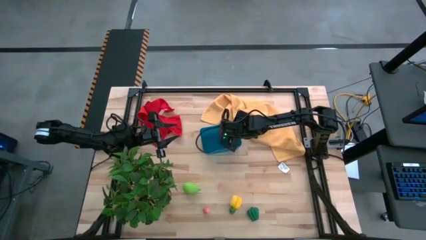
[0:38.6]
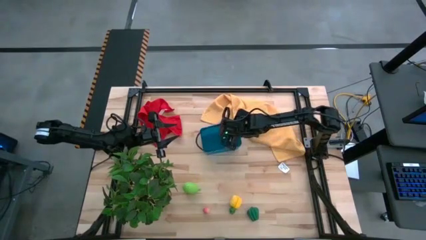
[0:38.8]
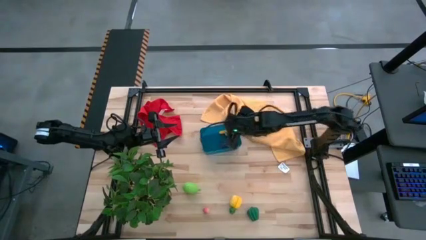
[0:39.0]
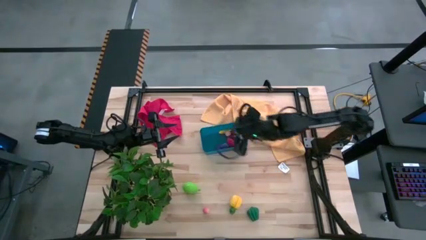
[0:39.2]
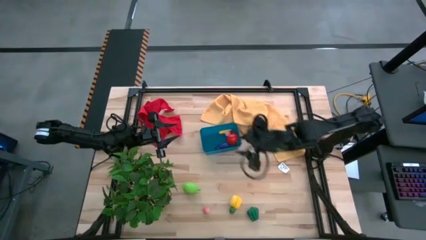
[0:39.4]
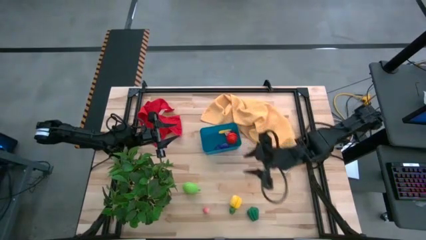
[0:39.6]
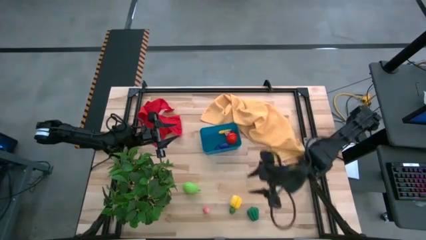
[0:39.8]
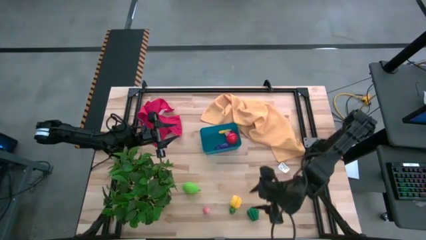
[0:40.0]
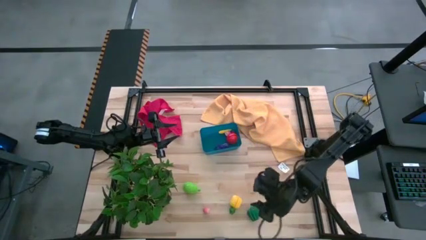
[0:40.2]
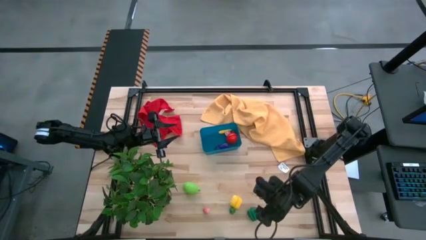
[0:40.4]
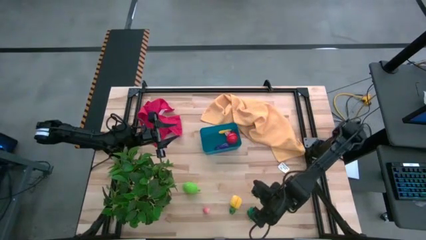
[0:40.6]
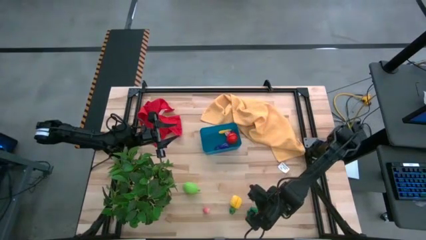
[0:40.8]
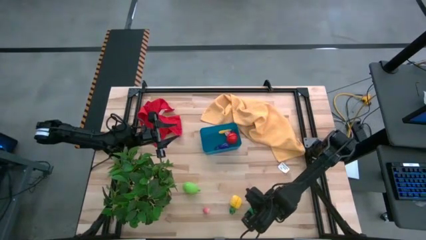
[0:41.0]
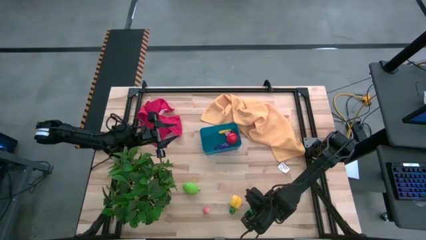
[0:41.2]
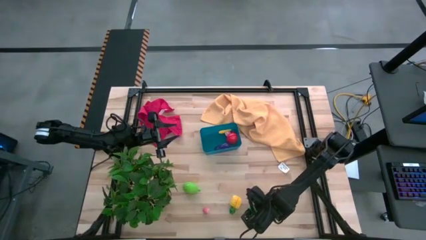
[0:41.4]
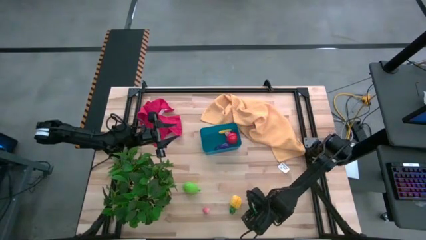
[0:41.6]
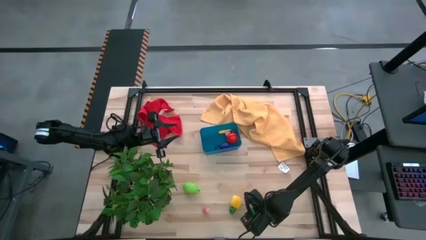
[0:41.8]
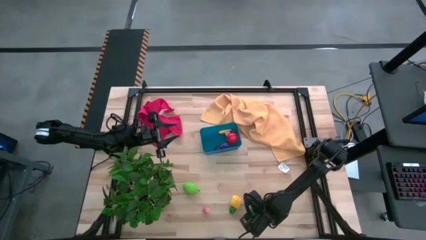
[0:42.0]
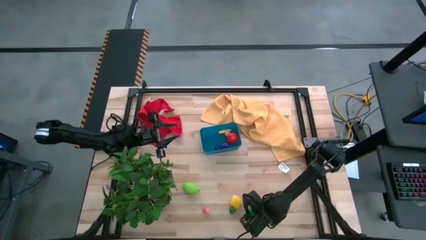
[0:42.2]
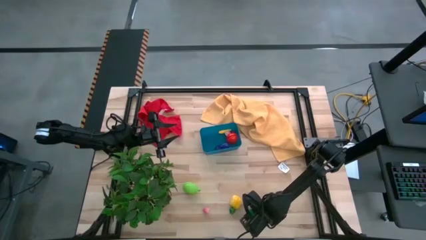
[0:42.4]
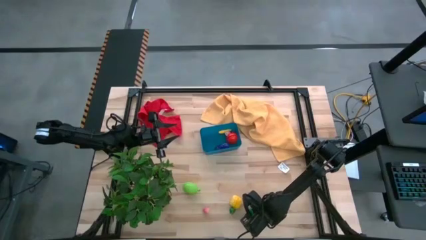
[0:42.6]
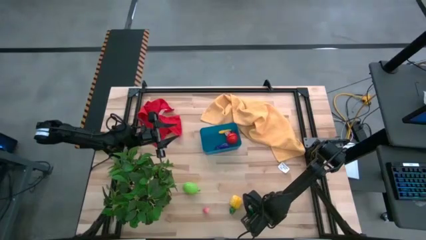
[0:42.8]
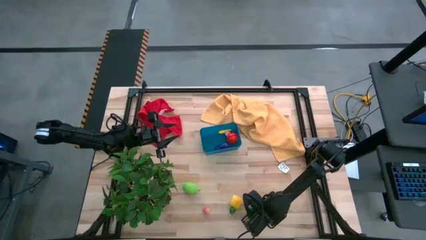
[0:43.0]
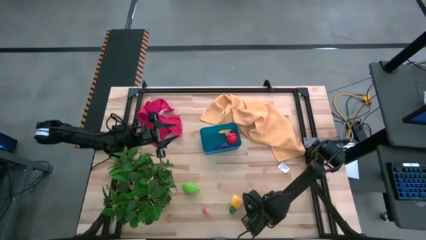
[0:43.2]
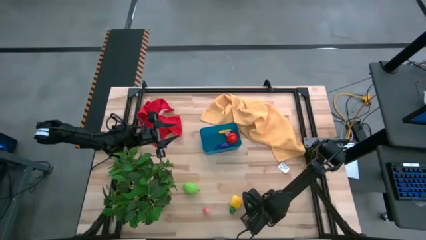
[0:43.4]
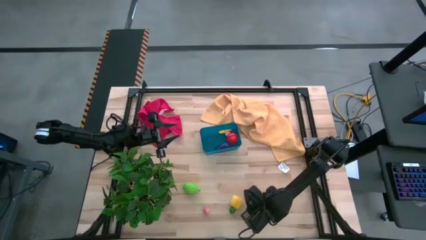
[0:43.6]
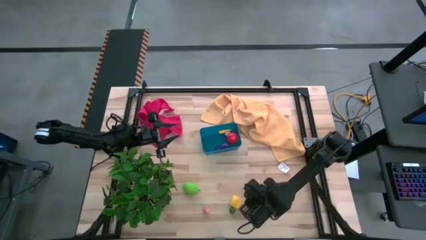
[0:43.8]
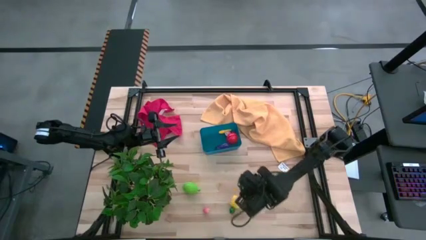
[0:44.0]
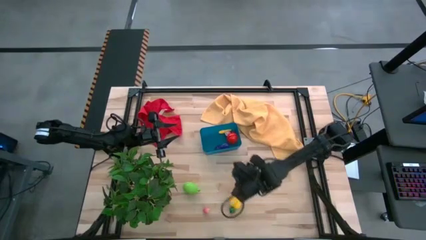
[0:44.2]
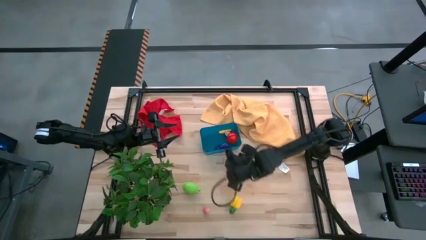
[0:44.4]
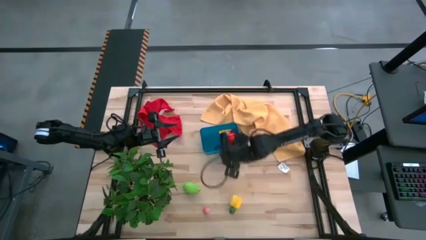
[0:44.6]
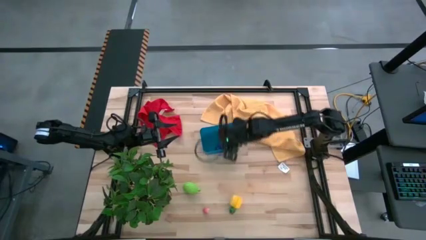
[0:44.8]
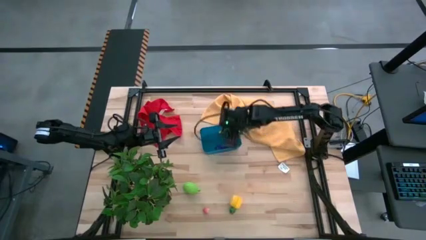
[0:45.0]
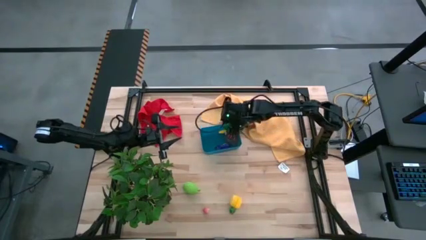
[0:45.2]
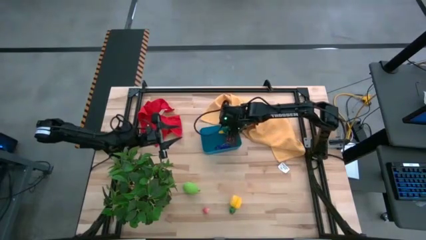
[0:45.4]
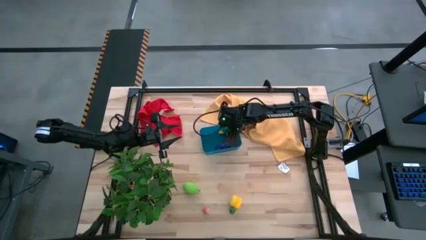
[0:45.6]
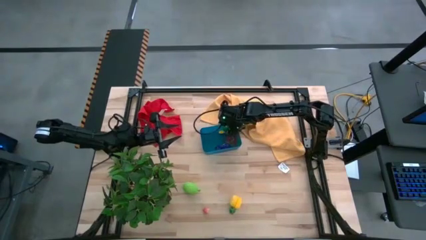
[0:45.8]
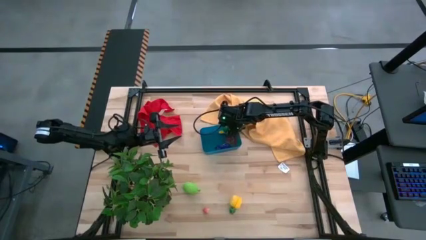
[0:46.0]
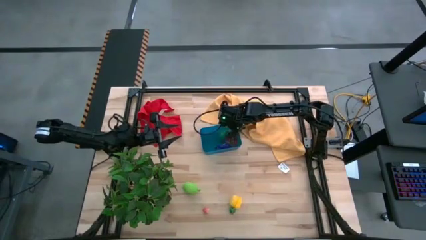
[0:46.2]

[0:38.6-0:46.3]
Task: Pick and placing Produce into tupperware
Put the green bell pepper into the blue bin

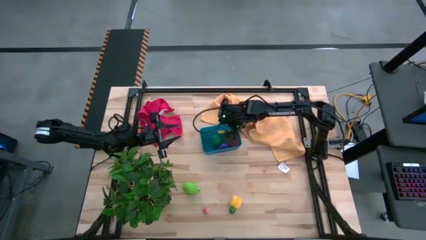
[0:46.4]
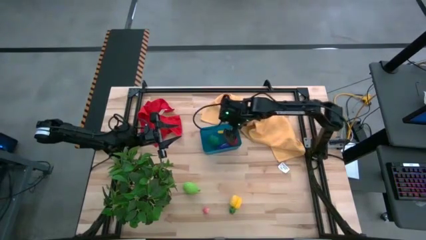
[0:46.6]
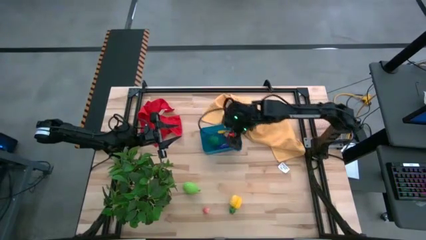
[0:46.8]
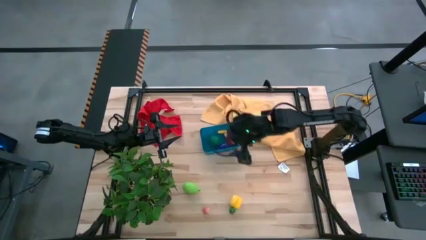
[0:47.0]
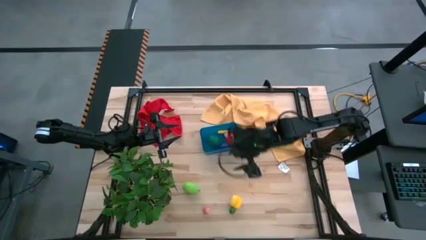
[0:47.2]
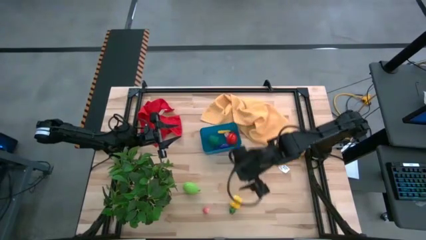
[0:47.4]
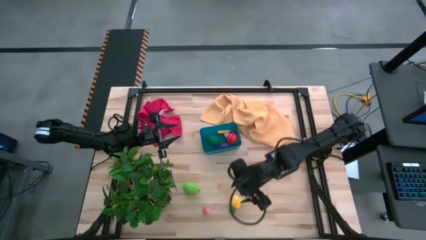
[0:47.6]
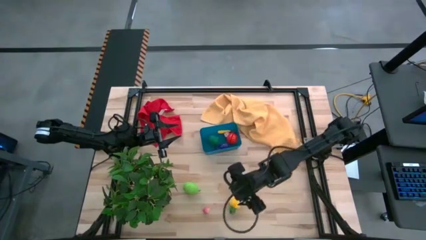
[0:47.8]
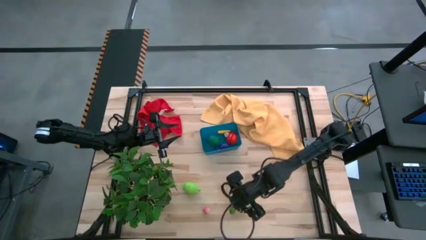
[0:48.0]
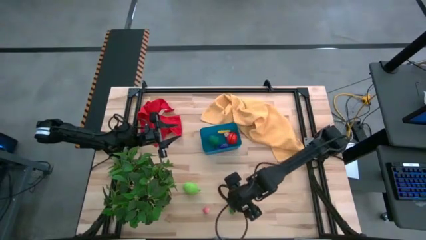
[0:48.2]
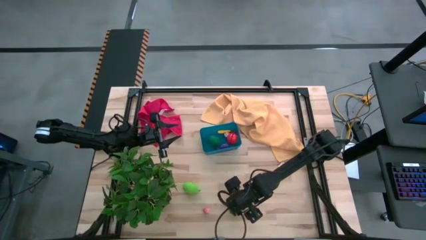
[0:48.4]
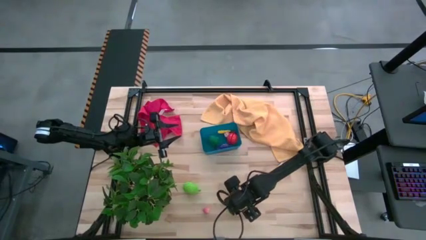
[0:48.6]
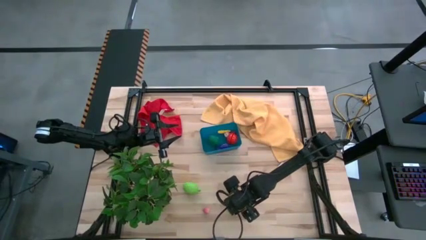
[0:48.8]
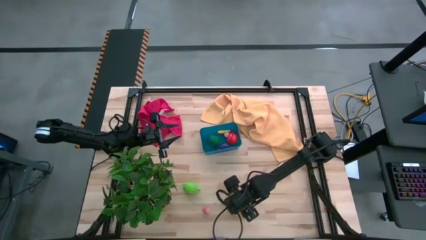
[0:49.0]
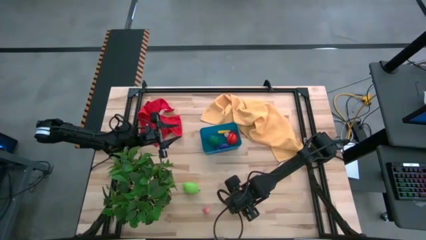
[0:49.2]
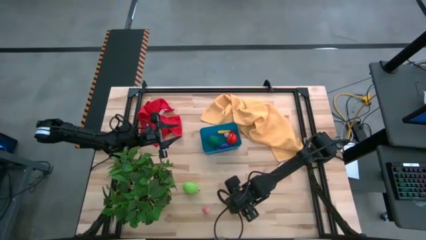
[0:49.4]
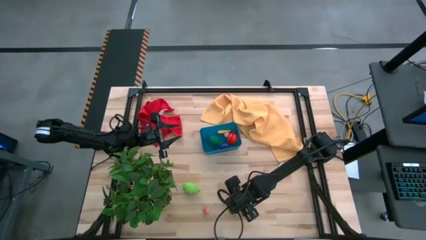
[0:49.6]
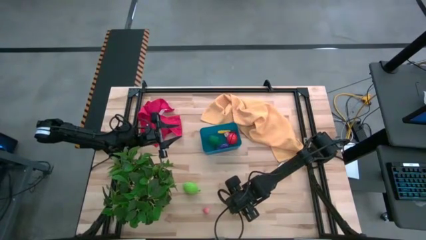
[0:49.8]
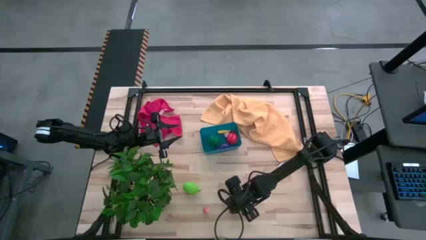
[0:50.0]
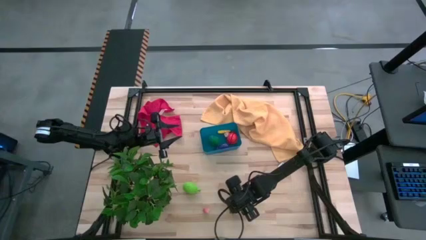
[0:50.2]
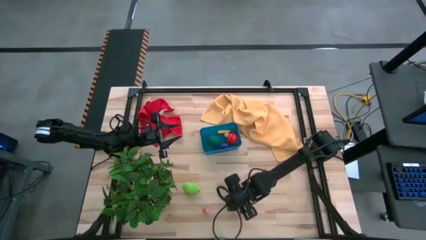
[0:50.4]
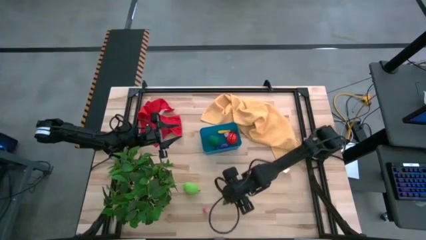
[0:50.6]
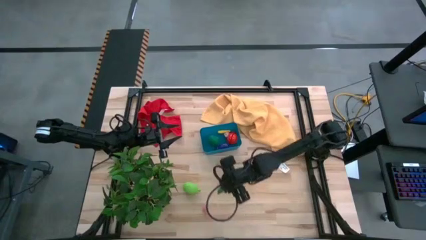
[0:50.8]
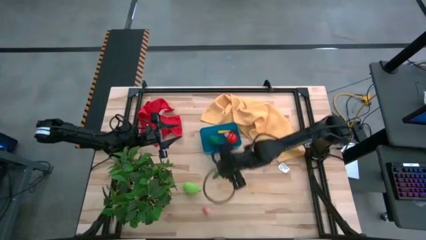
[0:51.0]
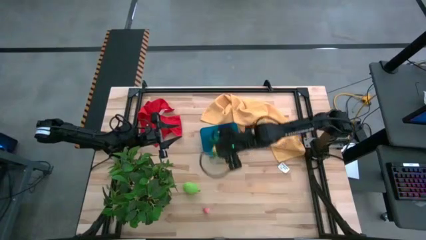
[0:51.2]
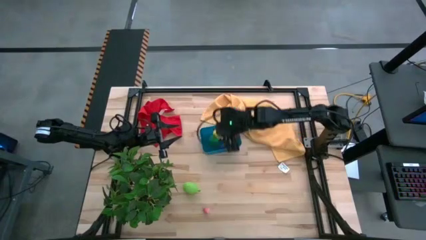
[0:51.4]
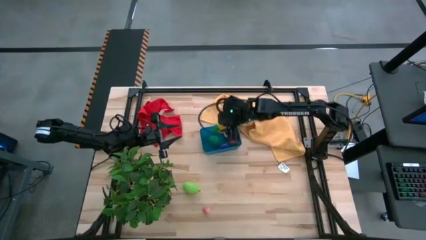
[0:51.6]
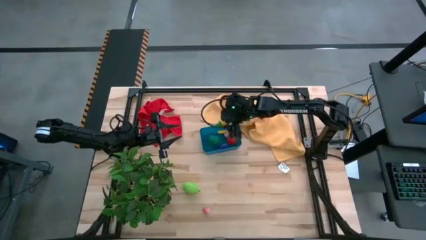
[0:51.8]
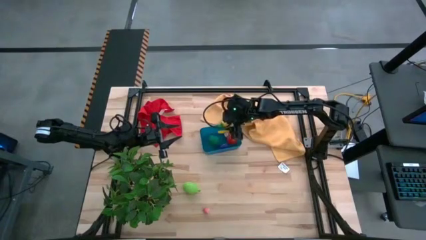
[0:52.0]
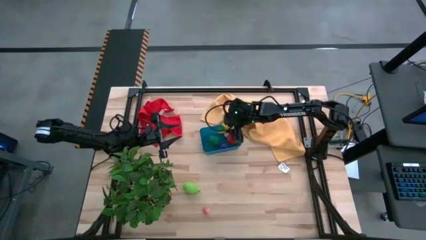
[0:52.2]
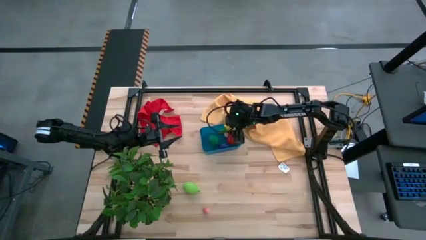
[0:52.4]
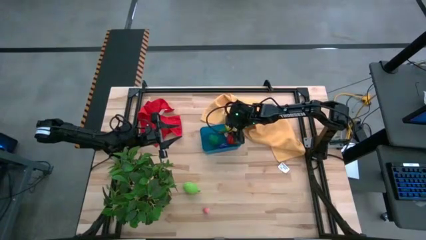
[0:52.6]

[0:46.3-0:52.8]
Put the yellow pineapple into the blue bin

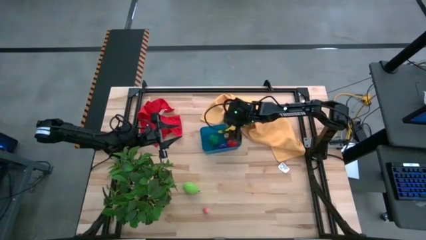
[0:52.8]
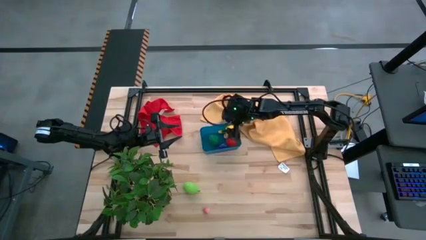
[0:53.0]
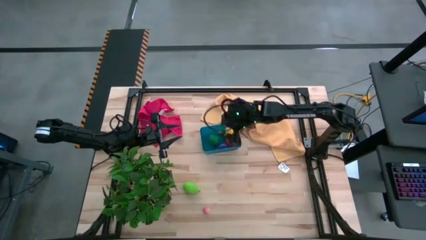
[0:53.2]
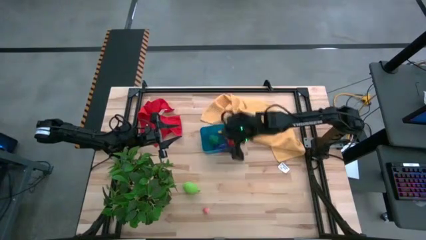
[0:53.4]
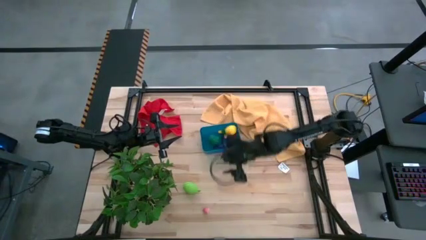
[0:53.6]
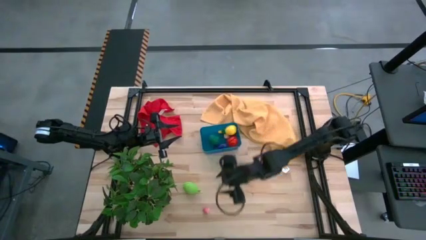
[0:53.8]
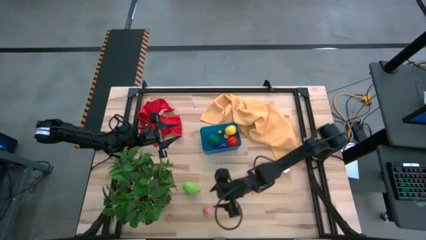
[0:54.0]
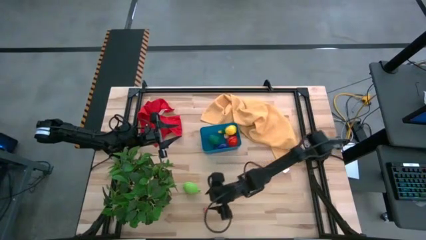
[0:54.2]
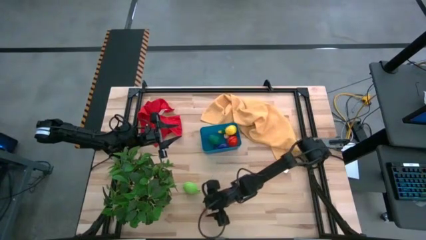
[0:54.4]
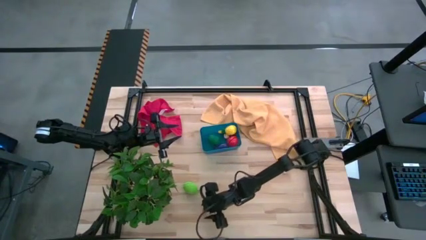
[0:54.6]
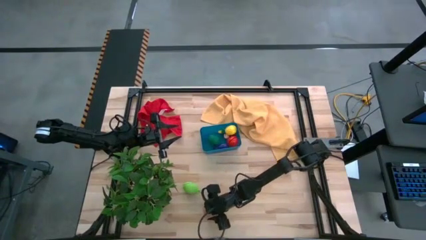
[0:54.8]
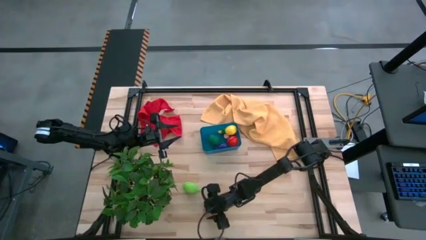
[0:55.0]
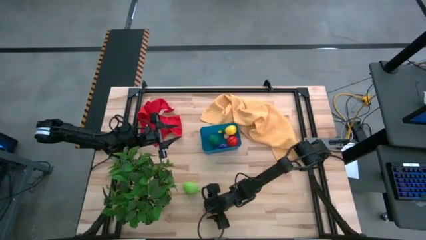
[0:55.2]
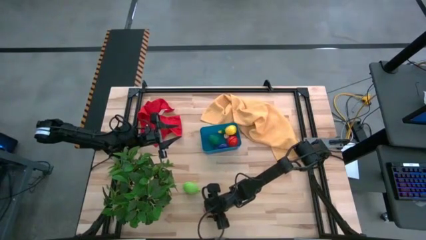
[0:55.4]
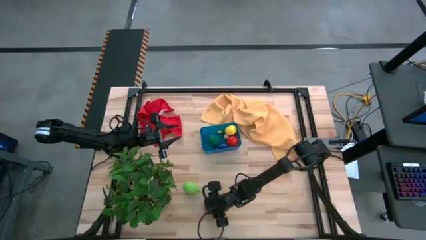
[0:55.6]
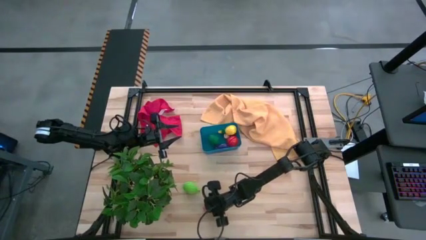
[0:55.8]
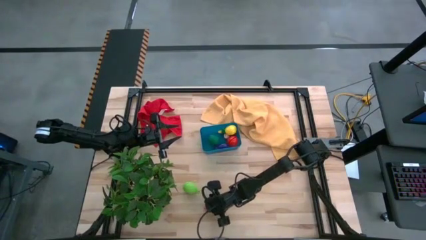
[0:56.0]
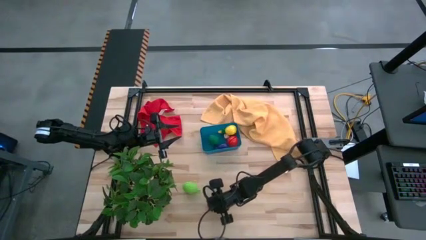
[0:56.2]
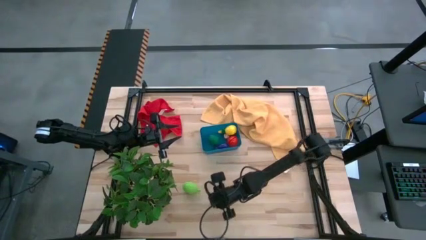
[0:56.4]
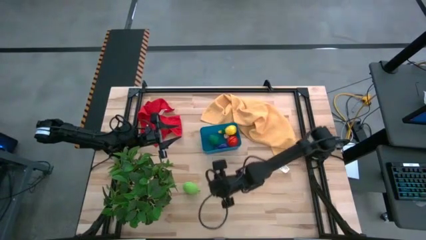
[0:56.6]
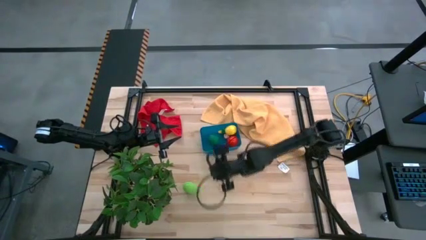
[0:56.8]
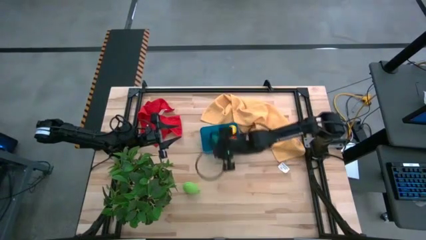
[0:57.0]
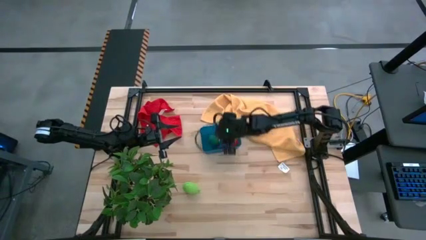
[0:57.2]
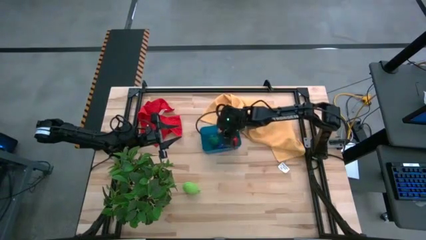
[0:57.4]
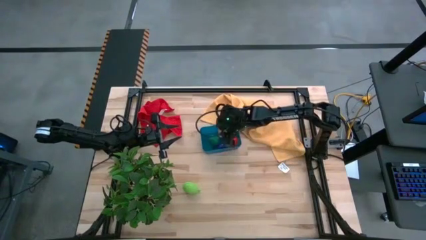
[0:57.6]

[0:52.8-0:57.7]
Put the pink peach into the blue bin
